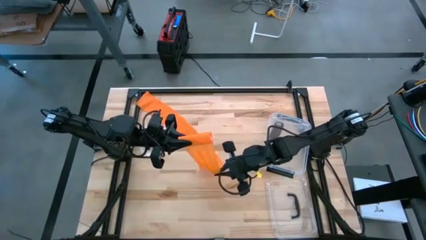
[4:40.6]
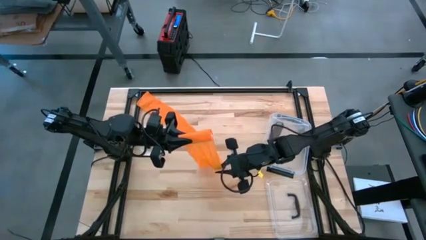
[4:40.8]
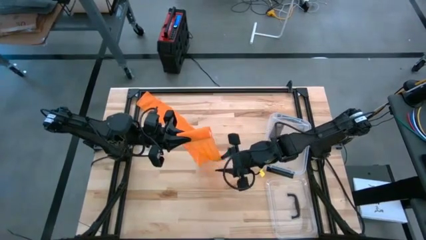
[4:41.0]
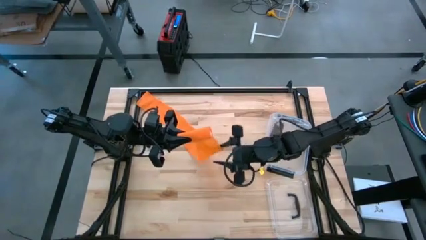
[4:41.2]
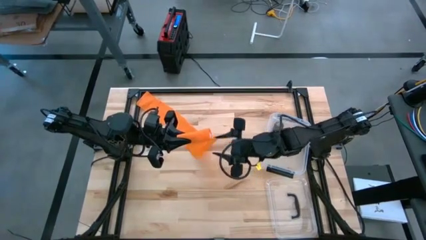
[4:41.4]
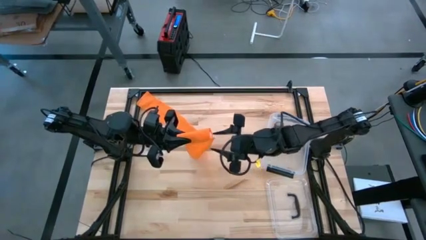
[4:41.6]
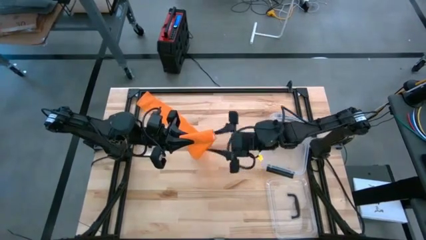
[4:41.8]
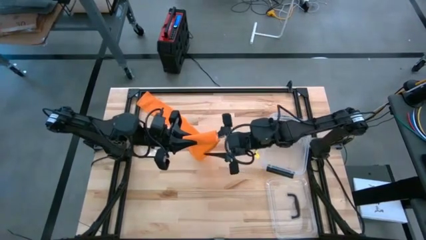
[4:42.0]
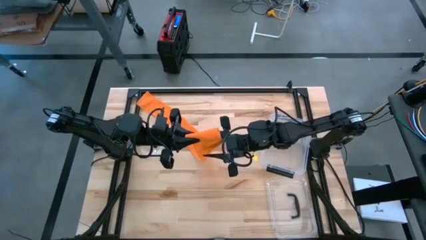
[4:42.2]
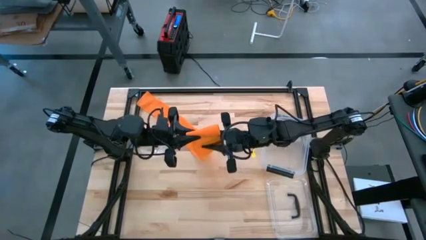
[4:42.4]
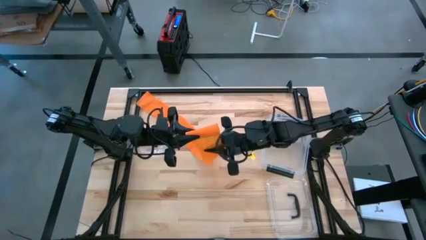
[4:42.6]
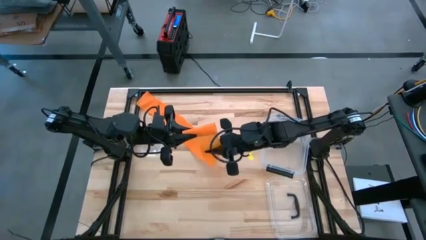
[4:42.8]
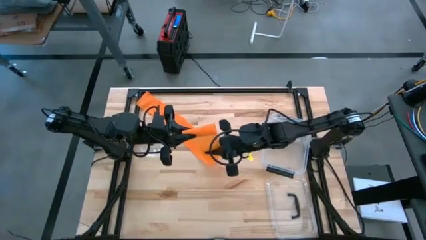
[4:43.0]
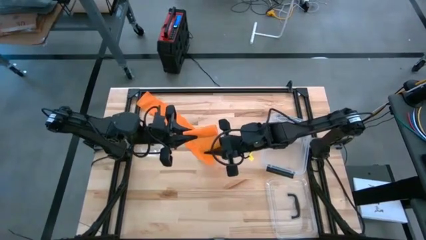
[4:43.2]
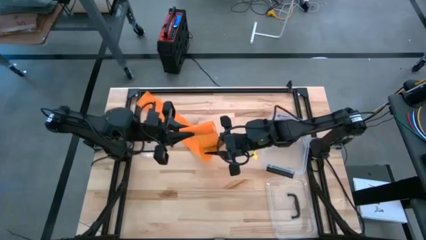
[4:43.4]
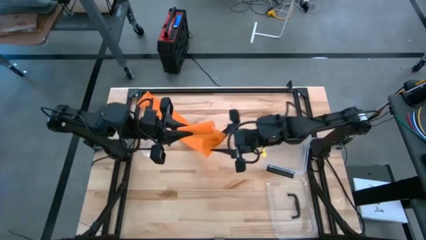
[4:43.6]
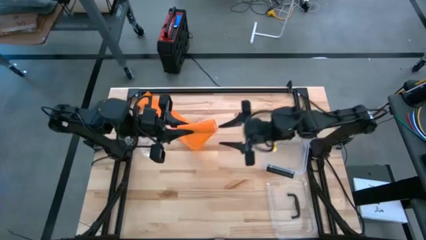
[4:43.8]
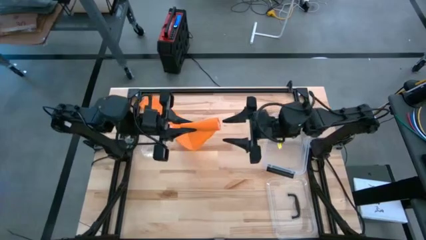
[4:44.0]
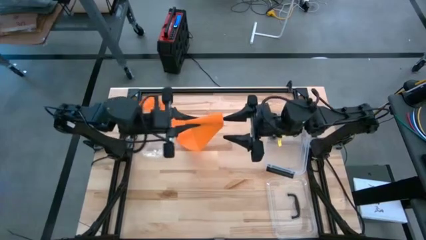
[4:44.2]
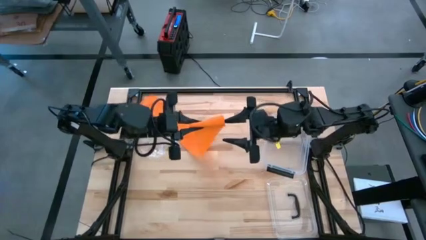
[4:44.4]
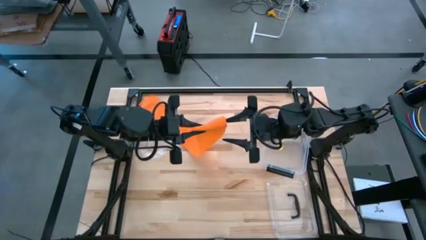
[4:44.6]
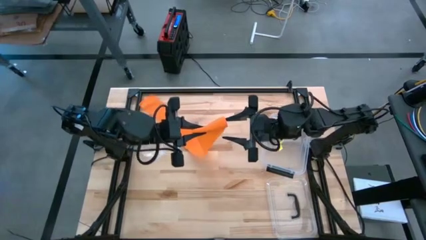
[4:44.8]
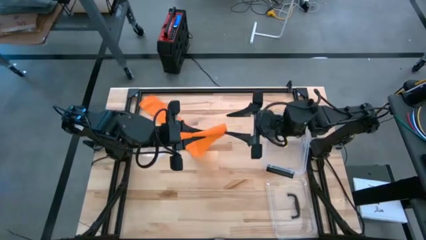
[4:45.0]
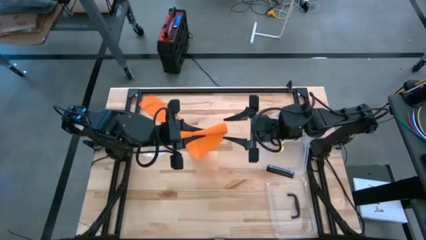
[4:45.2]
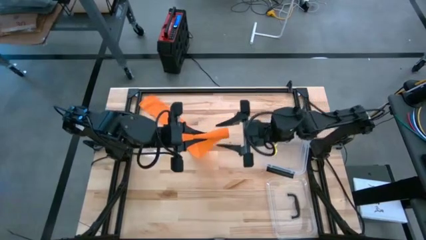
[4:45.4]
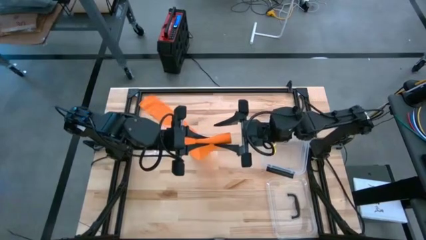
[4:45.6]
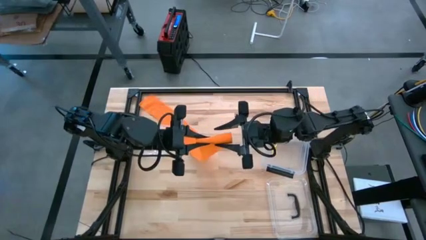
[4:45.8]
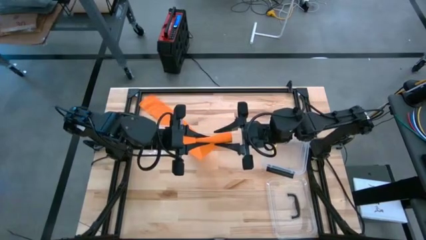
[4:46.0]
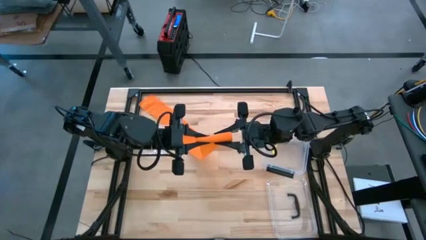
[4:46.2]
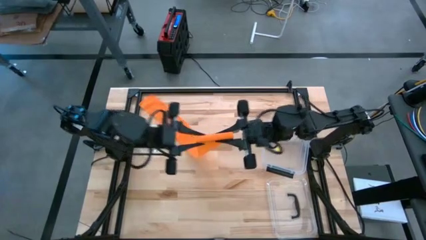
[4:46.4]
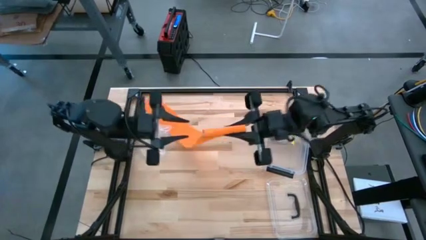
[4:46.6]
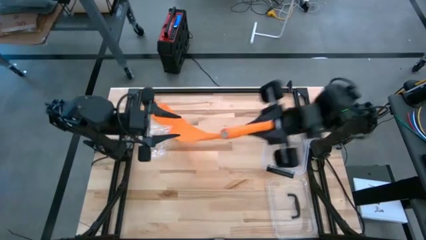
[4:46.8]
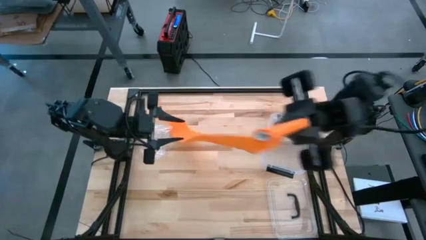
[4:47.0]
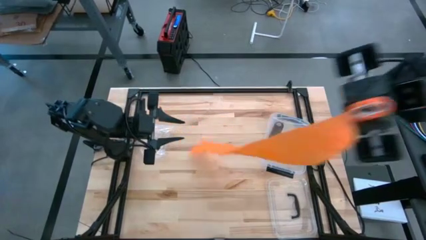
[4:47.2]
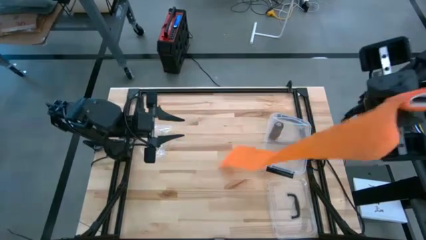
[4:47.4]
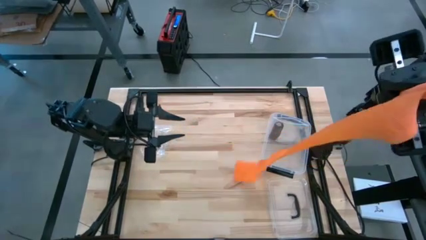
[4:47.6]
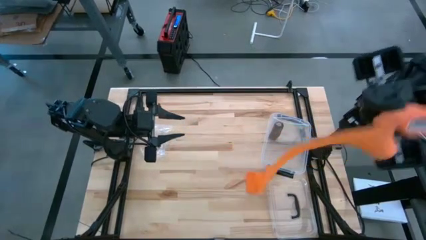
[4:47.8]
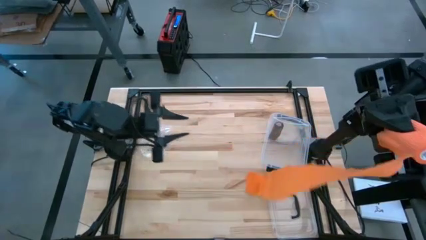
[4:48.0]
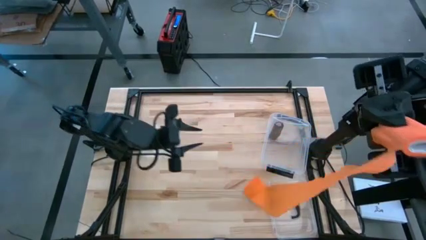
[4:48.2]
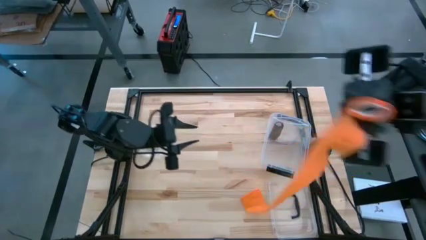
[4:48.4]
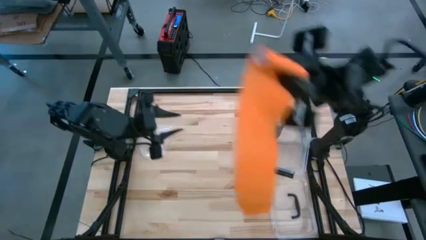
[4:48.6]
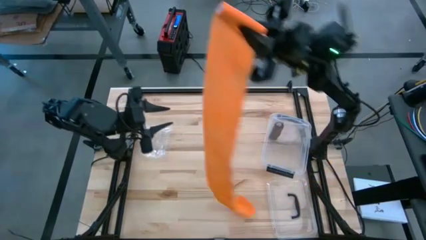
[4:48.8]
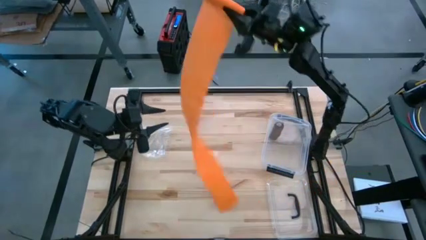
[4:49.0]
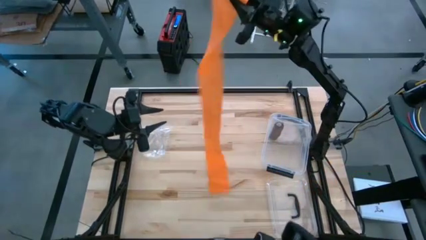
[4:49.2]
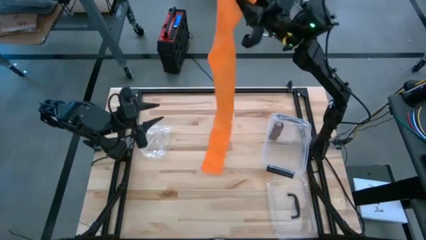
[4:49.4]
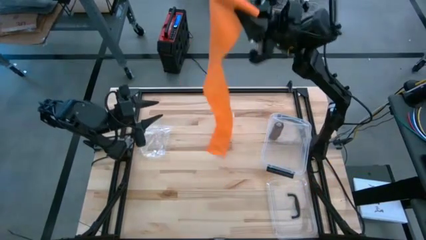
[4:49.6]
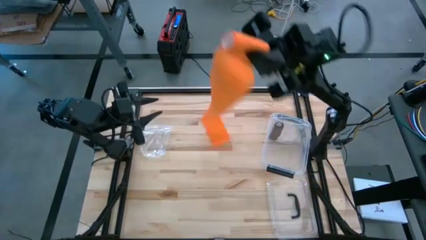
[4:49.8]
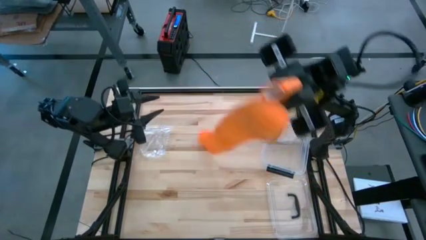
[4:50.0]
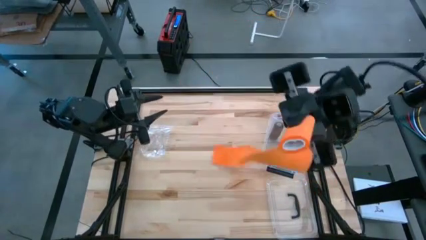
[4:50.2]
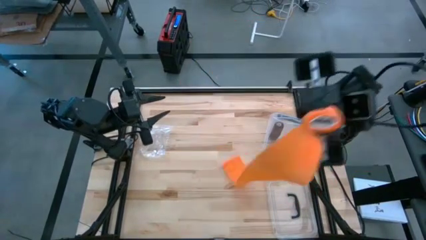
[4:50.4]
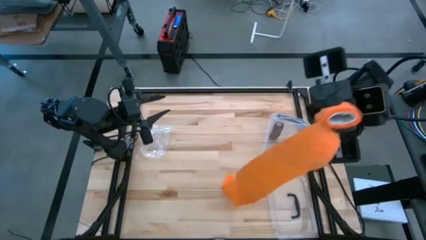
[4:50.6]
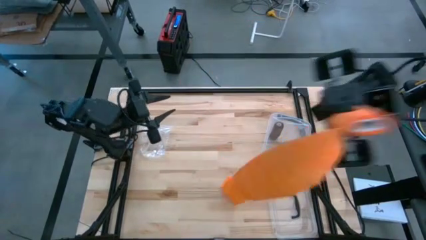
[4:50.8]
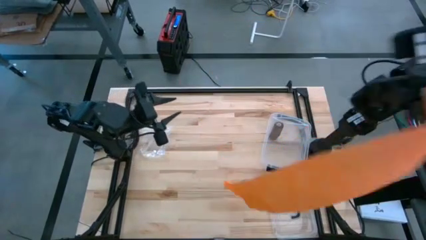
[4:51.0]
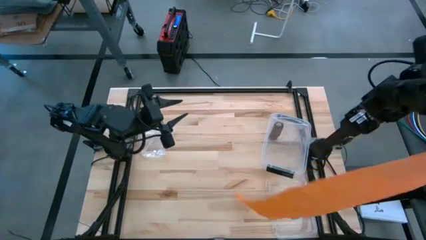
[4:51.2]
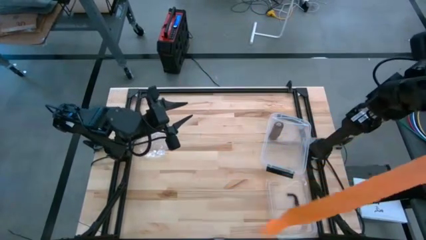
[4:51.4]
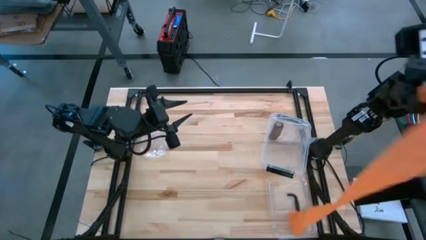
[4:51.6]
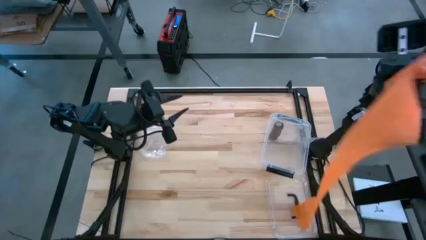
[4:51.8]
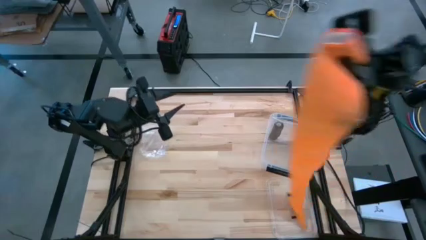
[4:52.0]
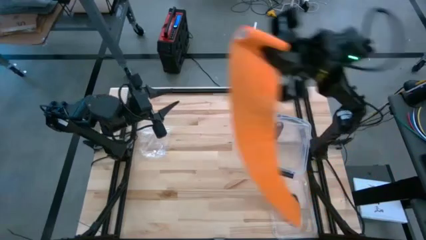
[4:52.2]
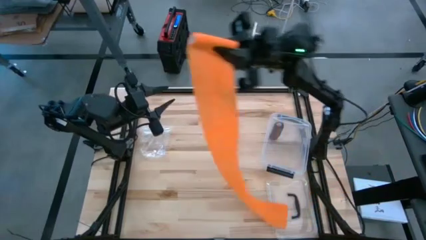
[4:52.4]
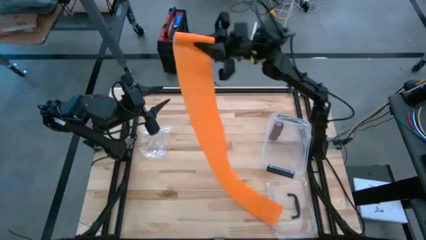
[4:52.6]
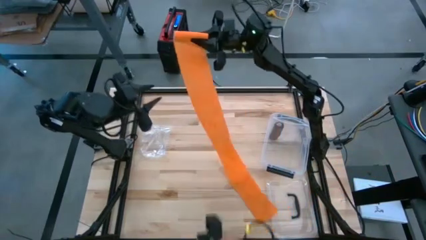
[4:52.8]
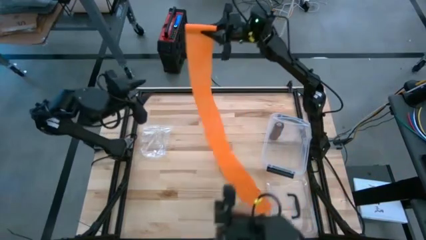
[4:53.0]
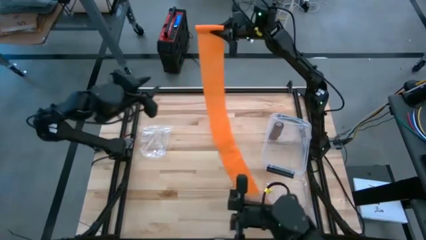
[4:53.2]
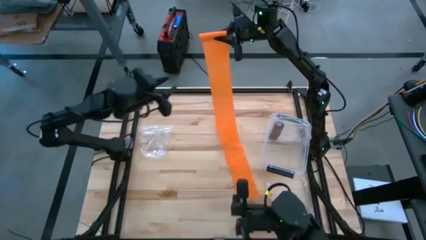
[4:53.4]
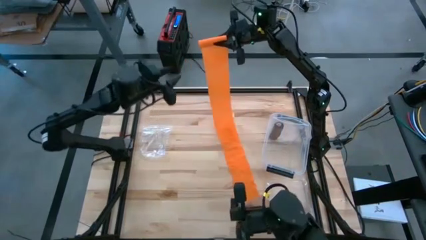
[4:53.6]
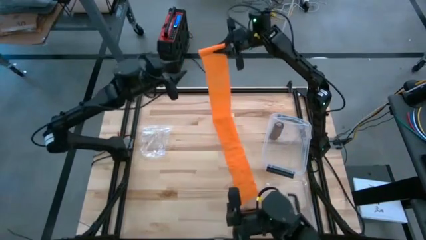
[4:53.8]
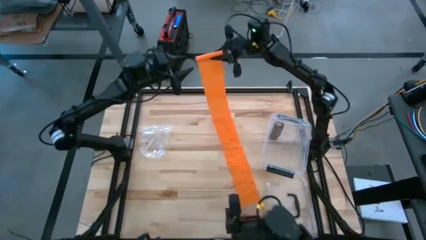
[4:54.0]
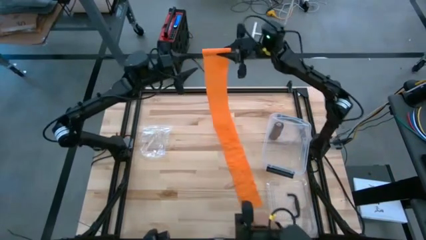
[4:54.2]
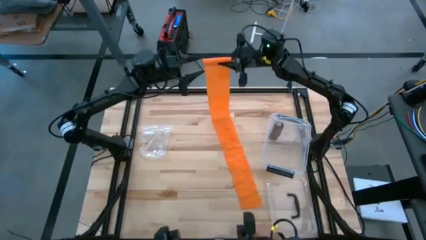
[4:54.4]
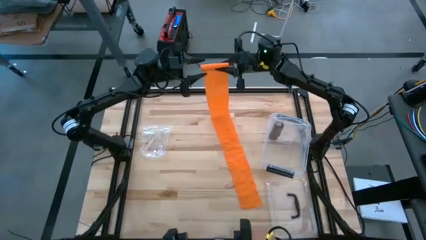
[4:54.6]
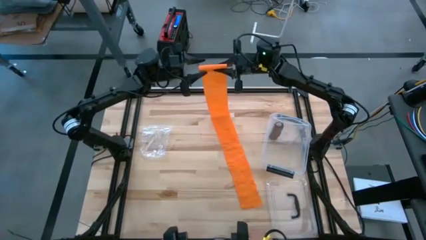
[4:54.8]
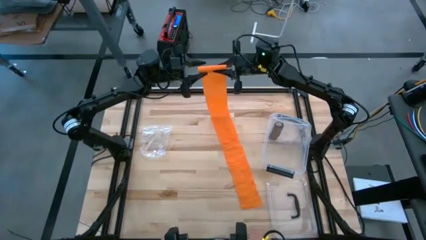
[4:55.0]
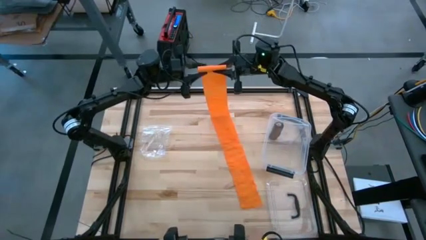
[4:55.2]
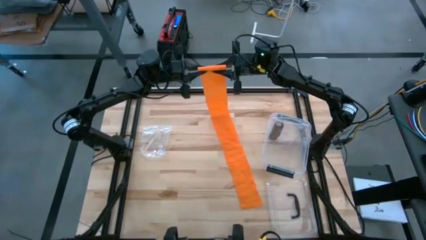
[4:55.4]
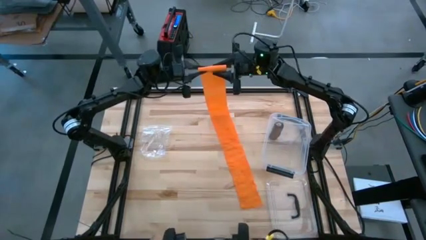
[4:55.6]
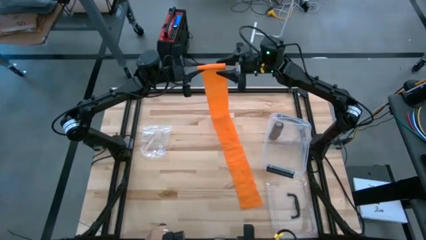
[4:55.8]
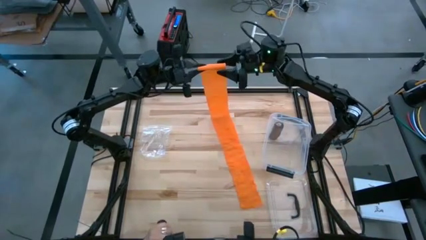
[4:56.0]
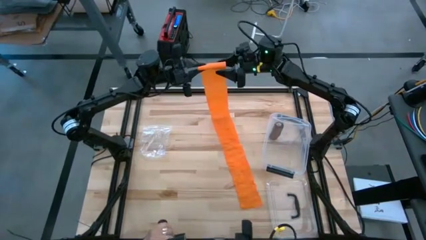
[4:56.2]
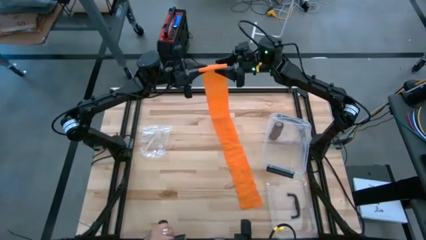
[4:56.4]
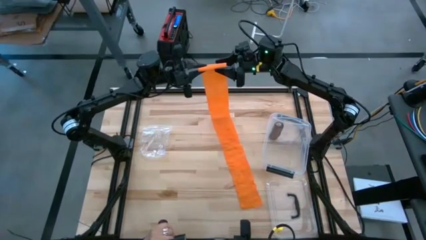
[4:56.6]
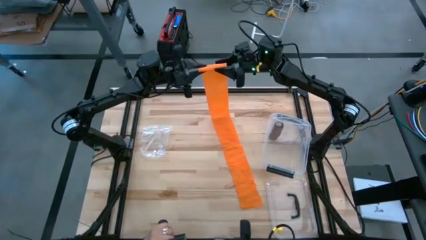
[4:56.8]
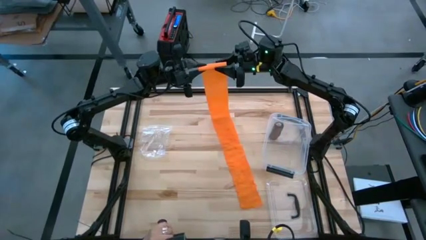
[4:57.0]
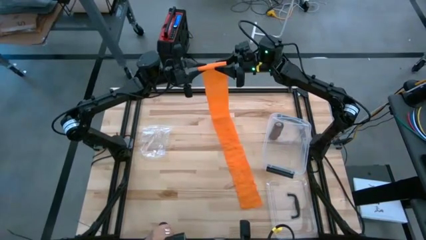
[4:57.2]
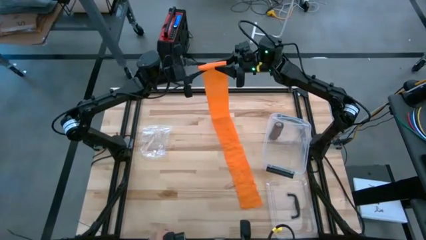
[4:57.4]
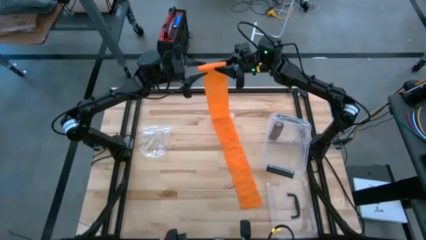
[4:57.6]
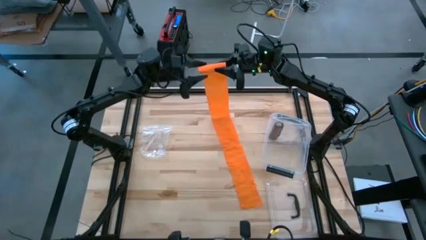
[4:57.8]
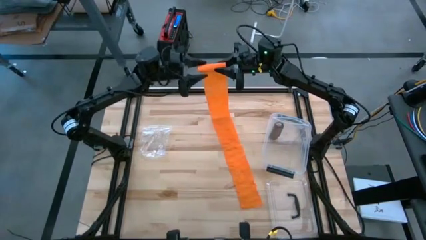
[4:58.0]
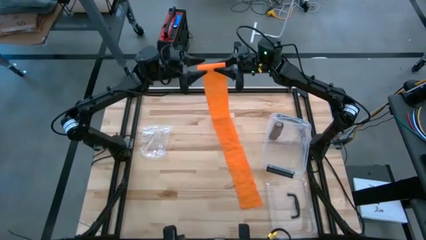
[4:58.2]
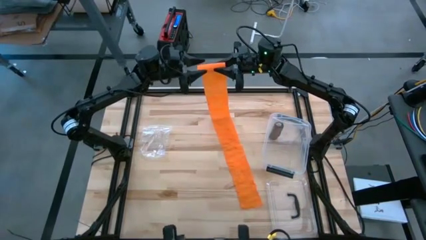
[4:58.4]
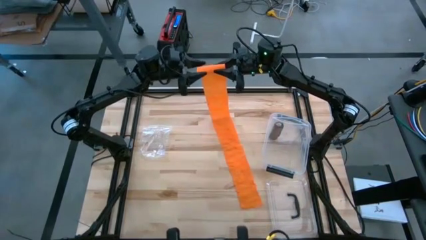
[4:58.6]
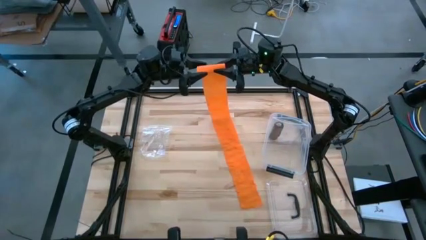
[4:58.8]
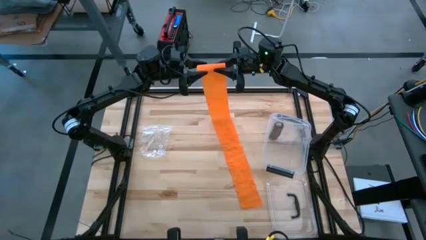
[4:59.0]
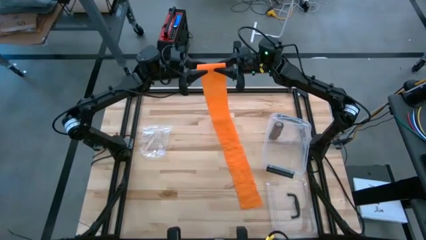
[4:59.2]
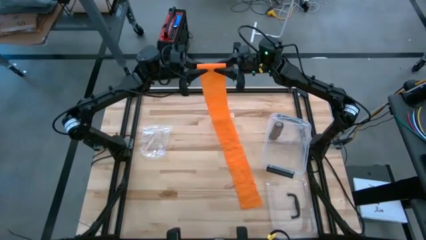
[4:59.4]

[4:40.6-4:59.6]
Task: Roll bandage
Roll the orange bandage
